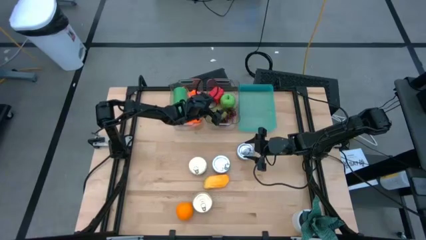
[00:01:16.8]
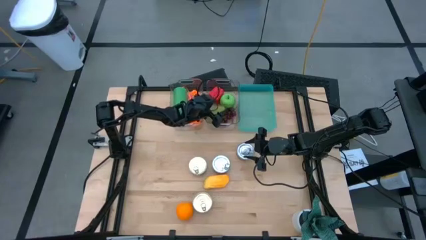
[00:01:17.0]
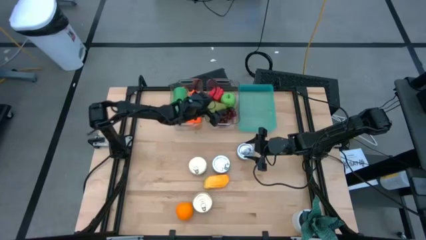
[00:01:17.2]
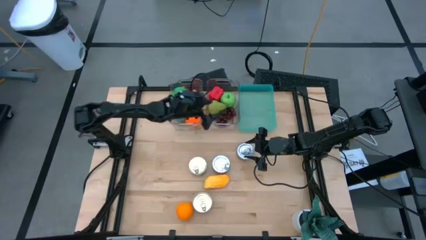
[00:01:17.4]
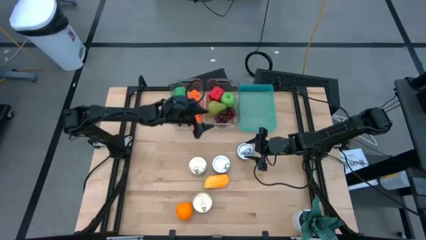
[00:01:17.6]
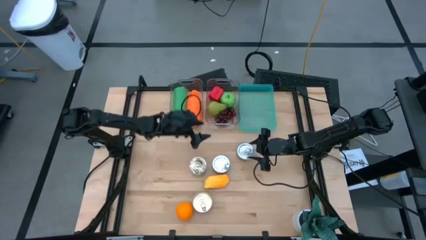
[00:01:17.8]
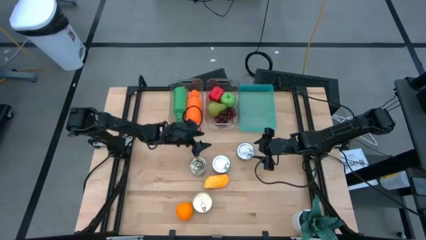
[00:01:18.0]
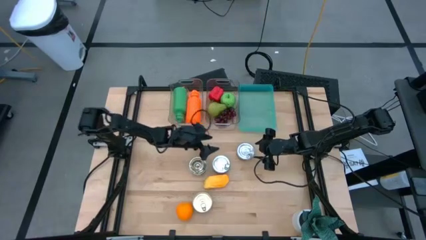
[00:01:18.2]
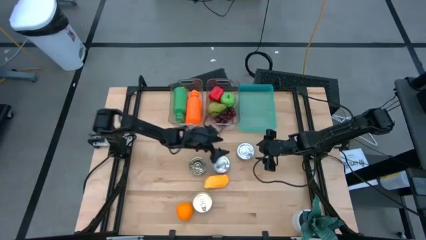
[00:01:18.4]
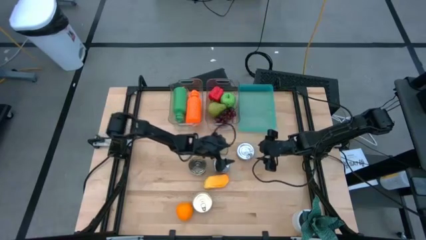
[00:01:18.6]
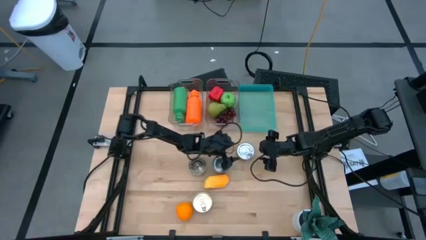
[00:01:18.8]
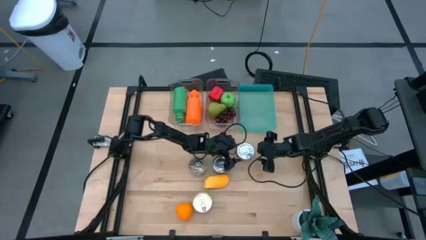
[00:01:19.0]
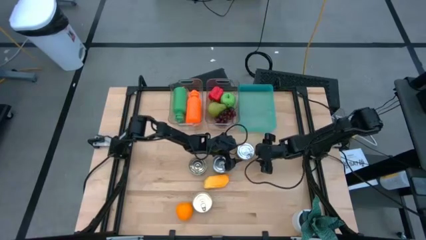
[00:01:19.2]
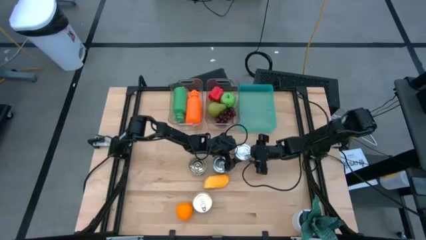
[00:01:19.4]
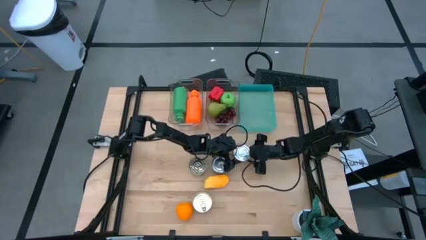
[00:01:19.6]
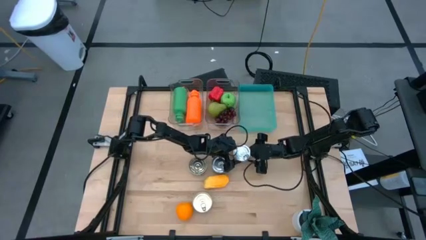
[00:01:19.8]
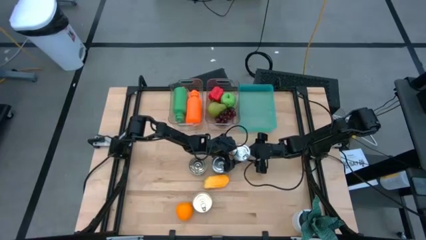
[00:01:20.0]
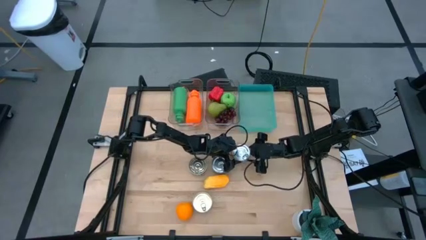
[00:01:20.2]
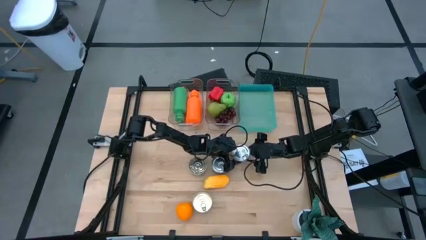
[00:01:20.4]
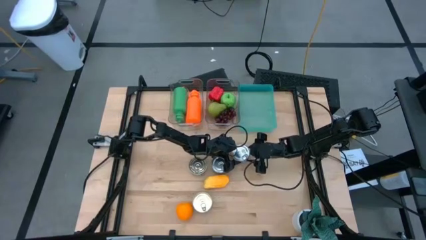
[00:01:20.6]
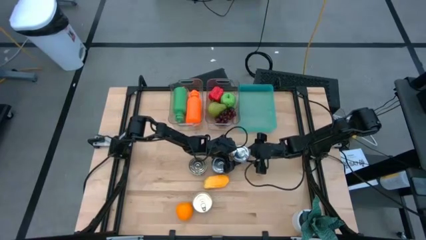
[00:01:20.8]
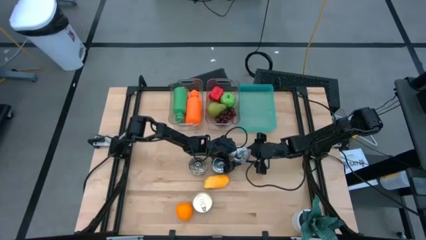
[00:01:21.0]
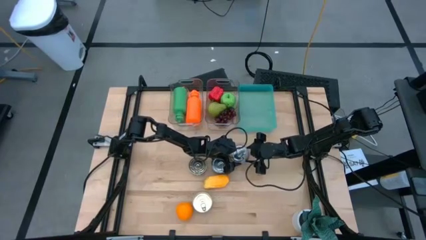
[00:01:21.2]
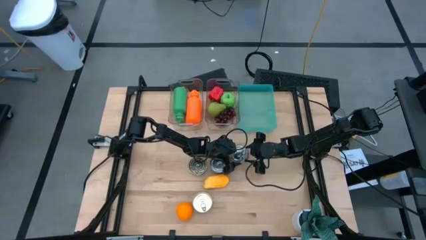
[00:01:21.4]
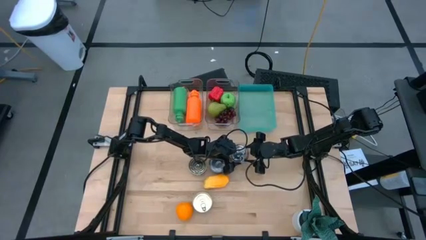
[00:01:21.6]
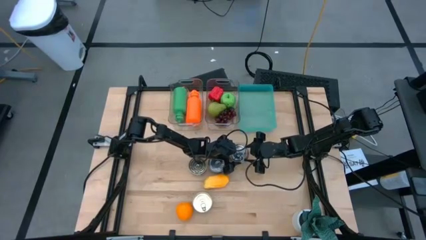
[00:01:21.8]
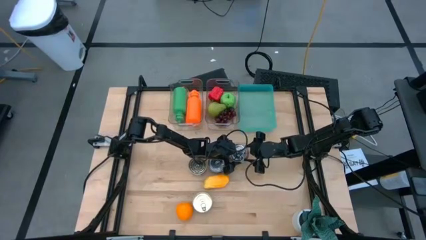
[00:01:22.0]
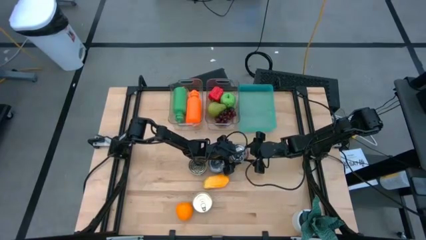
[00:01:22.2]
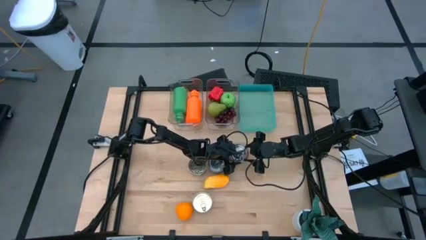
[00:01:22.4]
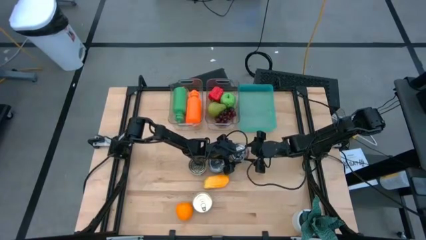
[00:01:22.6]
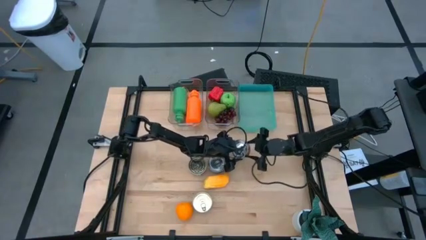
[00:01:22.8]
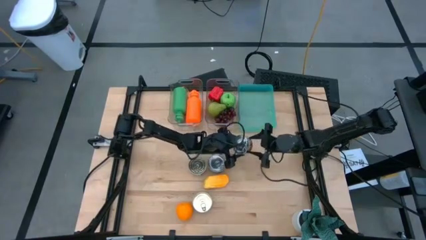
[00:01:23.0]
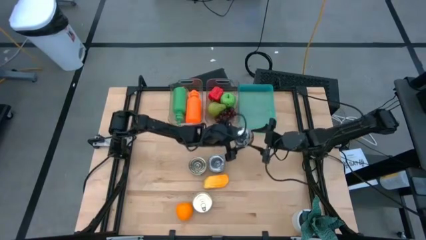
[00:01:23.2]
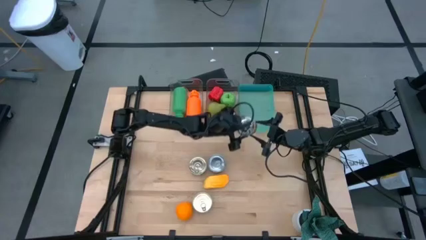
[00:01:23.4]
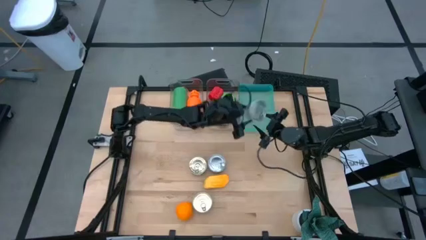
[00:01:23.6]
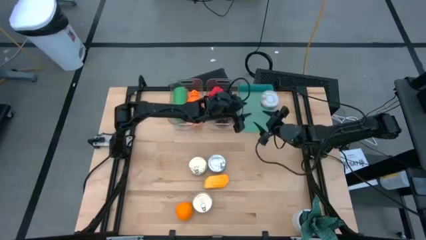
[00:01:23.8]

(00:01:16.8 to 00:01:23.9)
Task: Pick & Place Food Item
Put the right green tuna can into the green bin
